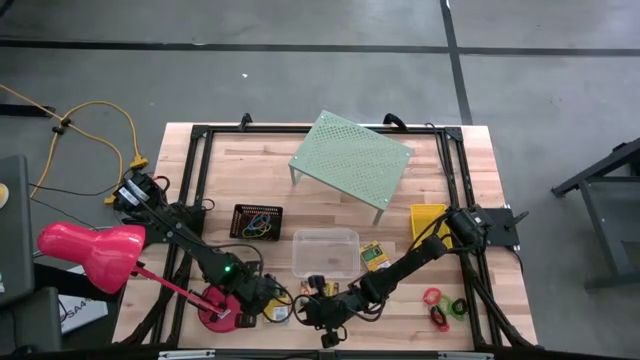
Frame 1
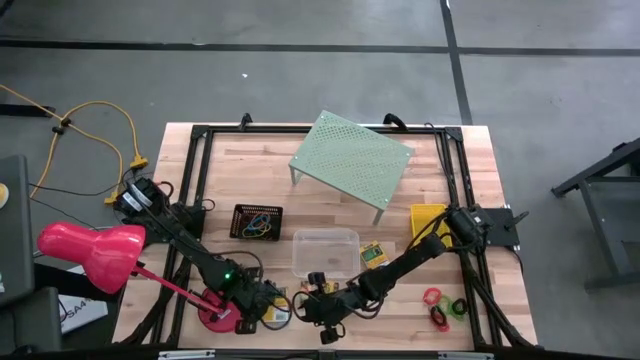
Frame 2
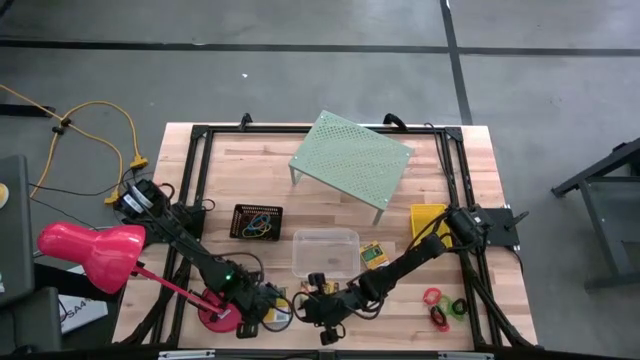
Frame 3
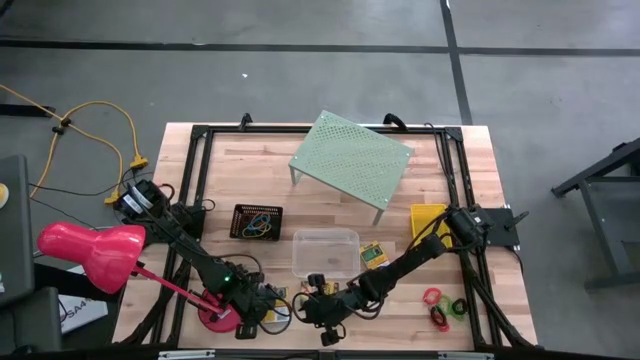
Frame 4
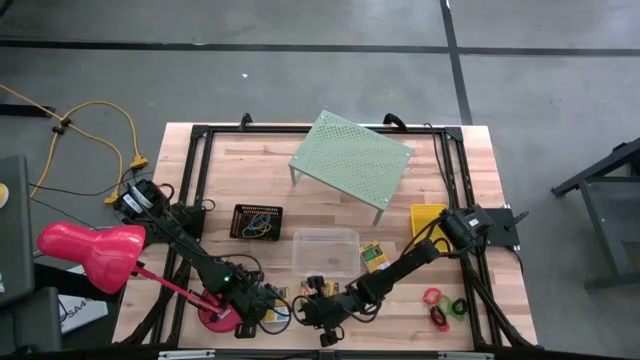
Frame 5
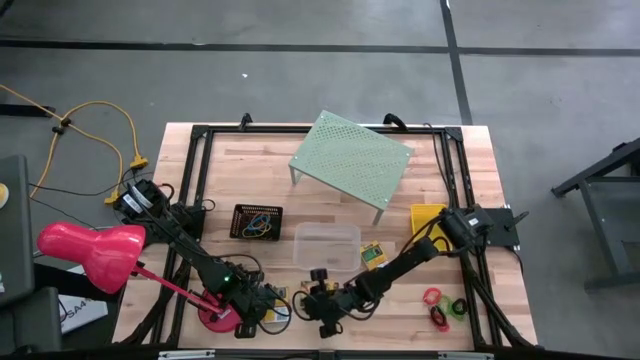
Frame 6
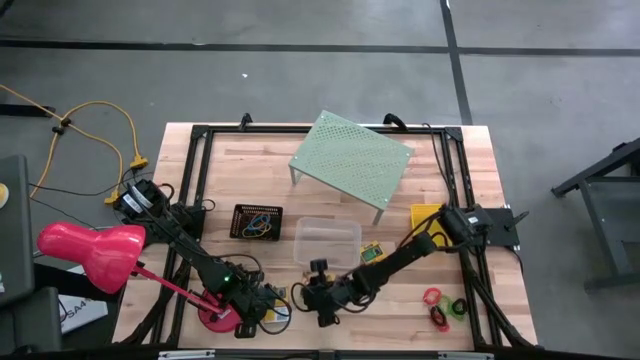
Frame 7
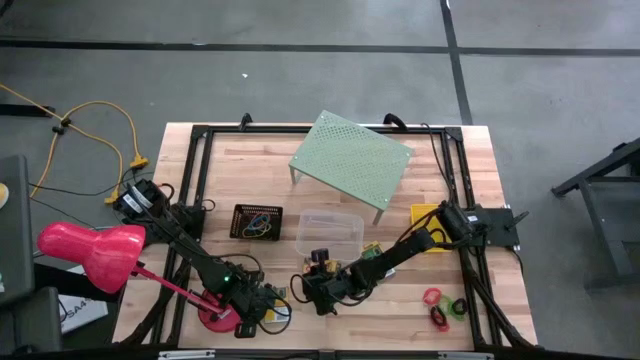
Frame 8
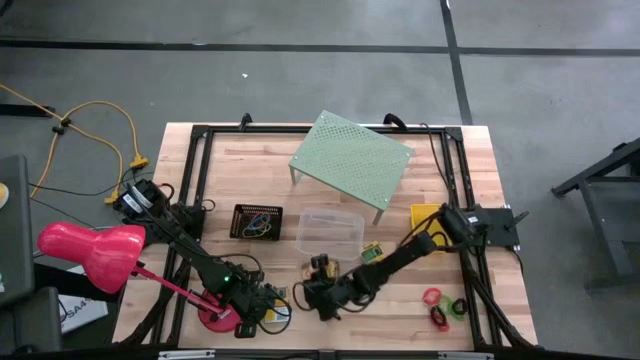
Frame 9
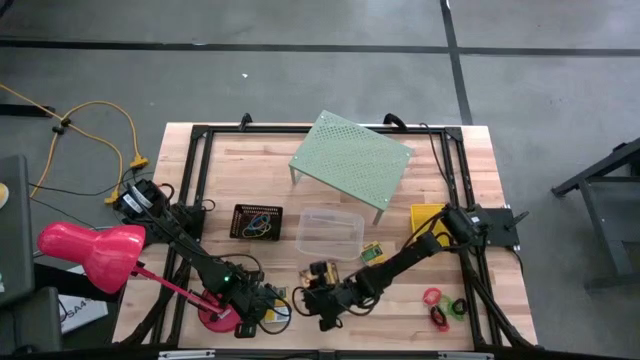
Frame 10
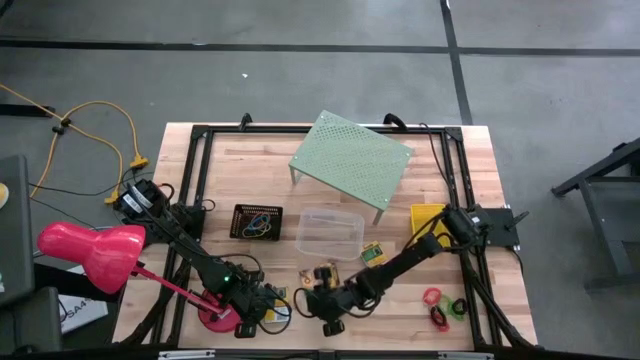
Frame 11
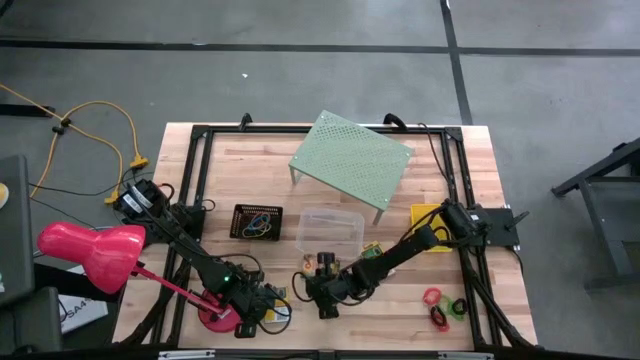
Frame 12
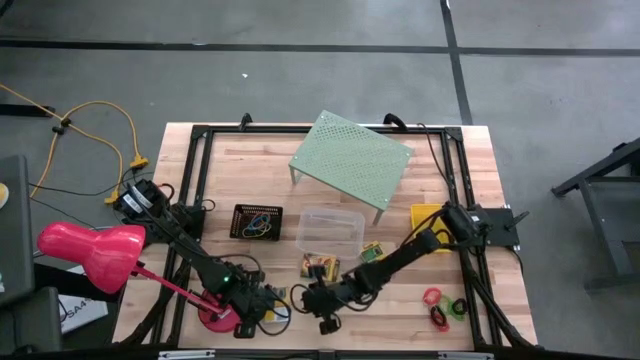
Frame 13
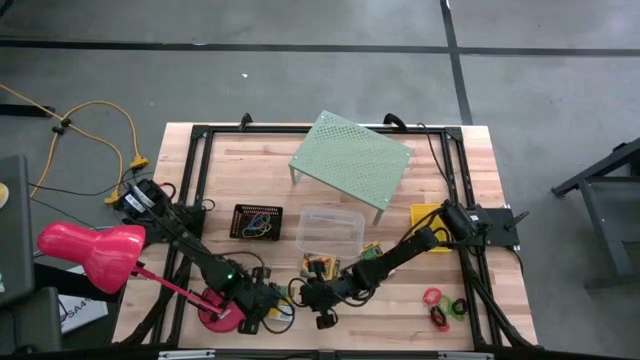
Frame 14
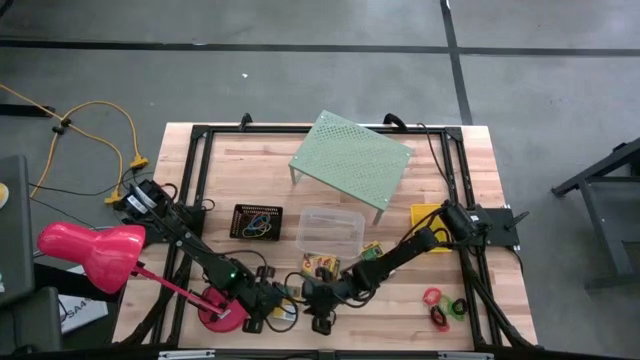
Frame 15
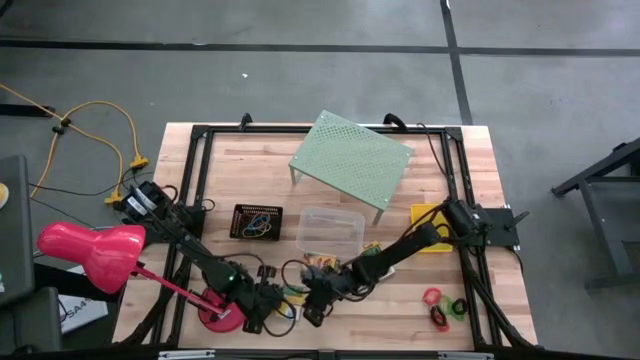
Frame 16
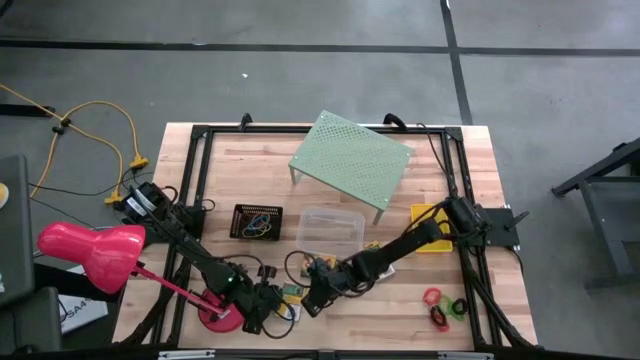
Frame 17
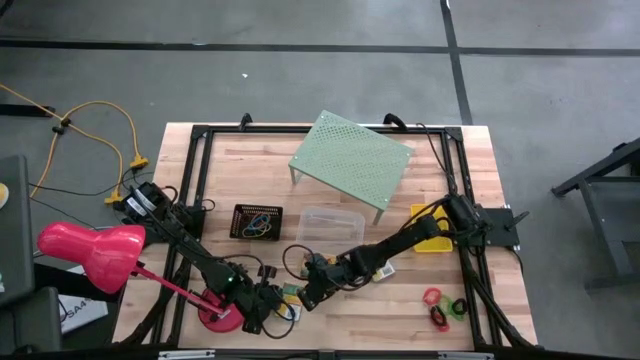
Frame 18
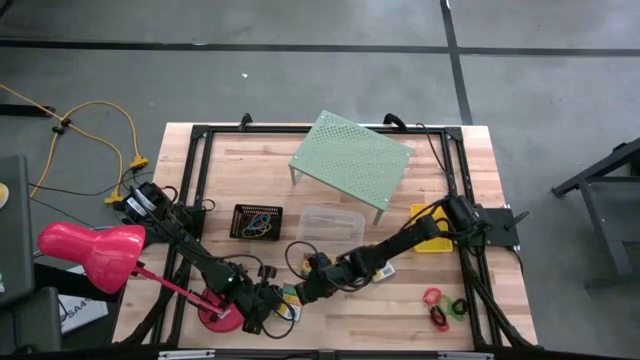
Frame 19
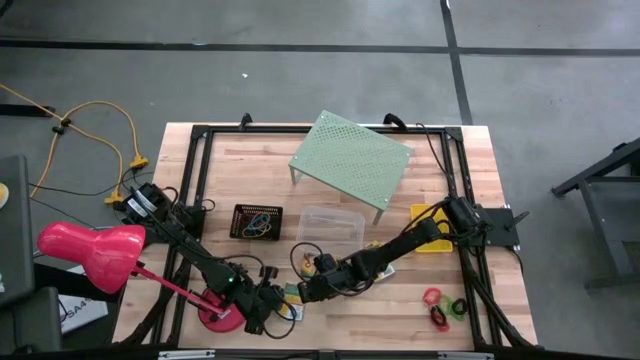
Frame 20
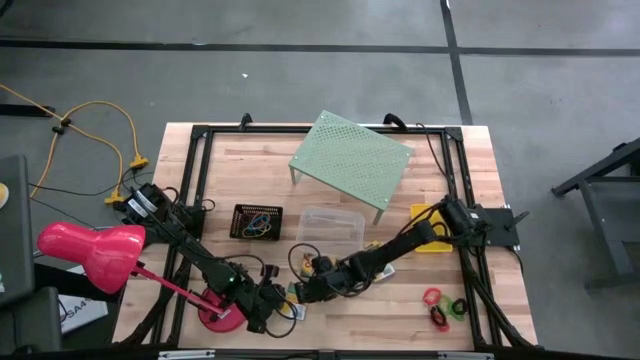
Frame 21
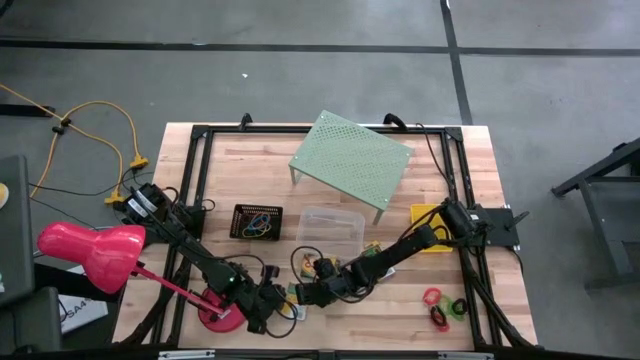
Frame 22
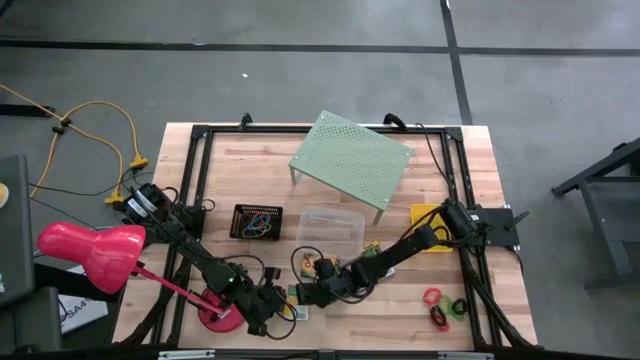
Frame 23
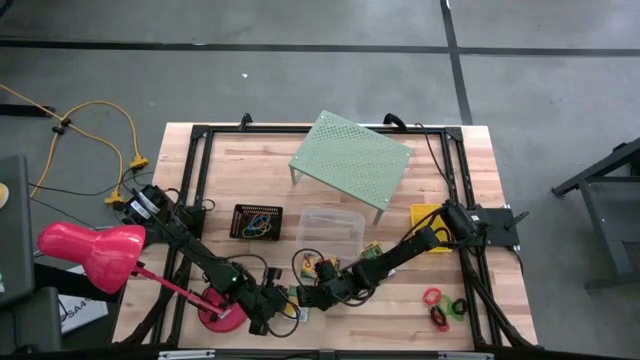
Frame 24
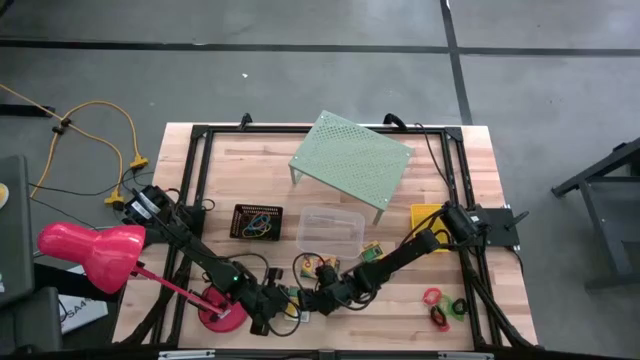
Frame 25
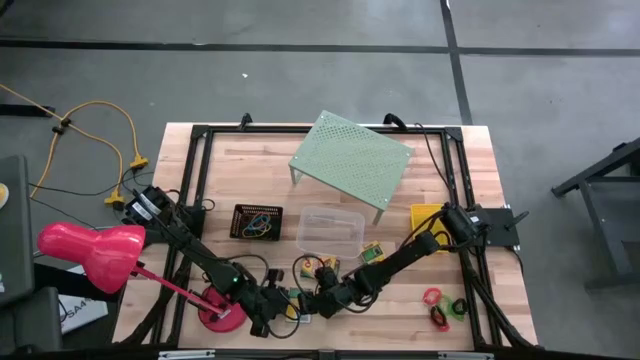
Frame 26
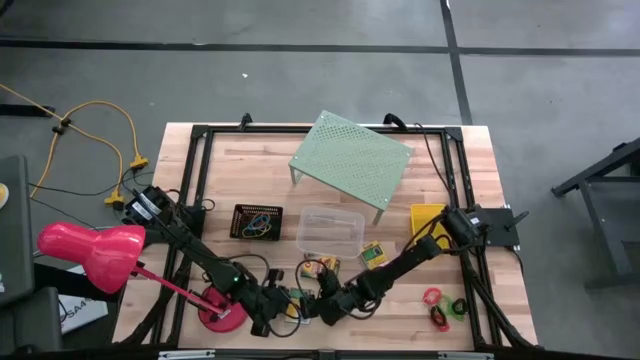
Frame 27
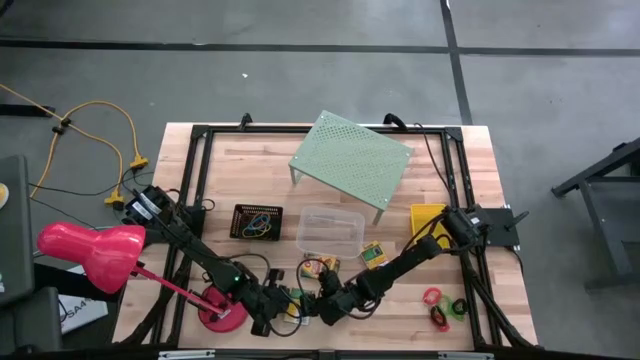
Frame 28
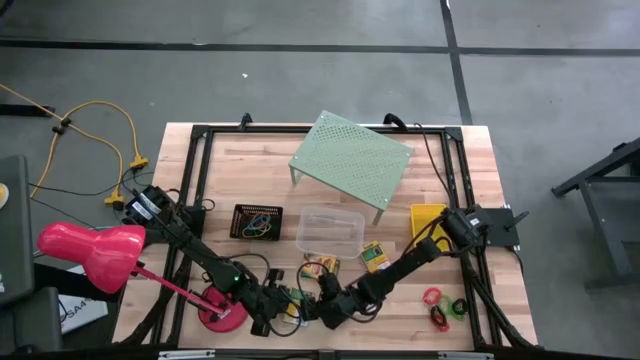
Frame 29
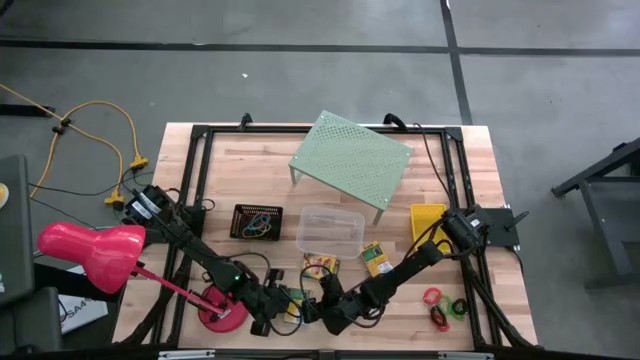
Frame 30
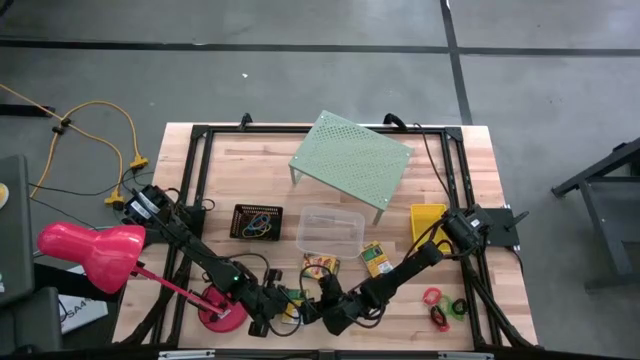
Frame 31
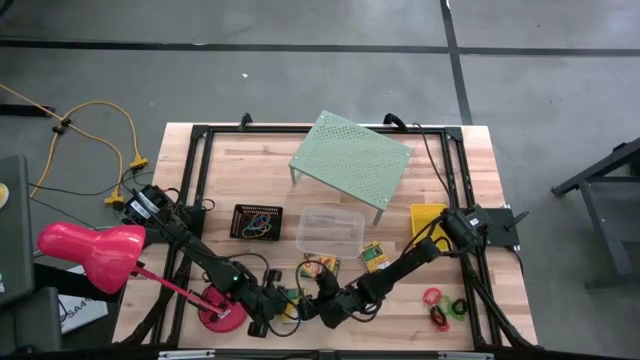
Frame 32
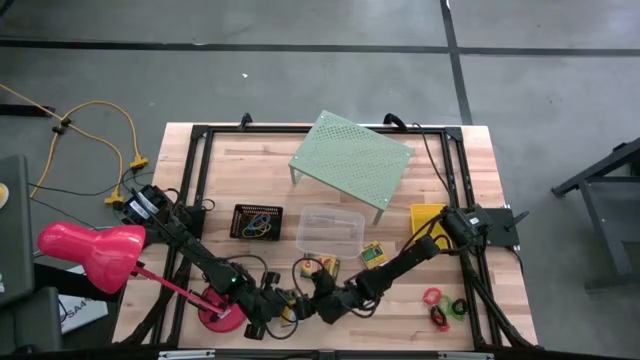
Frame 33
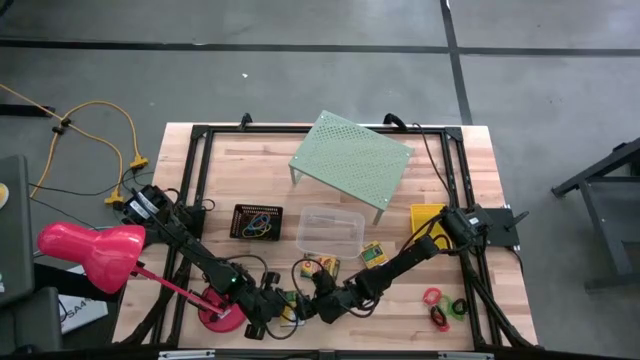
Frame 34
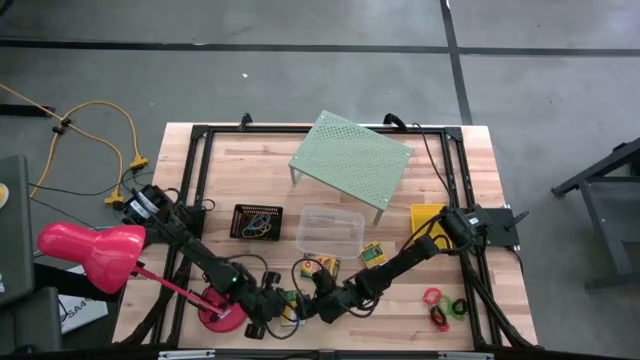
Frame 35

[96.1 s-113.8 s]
Task: Pick & Place Office Desk Supplies
Put the left yellow crayon box into the transparent bin

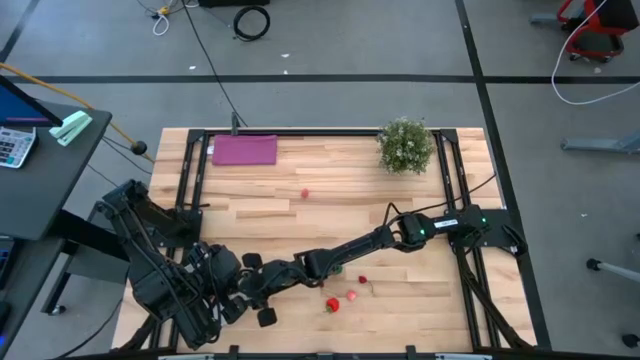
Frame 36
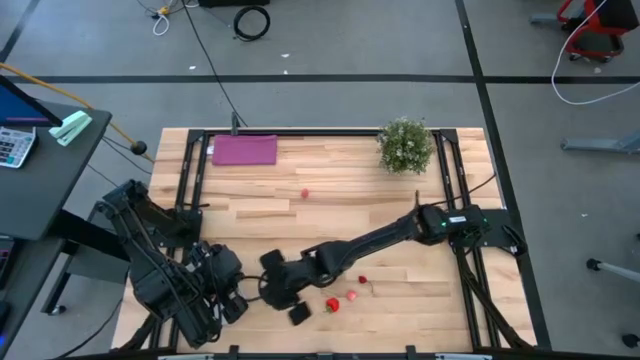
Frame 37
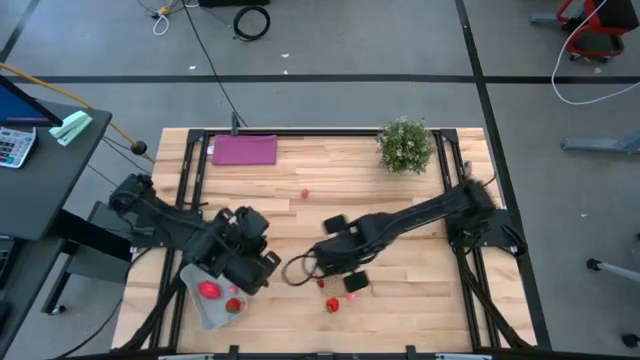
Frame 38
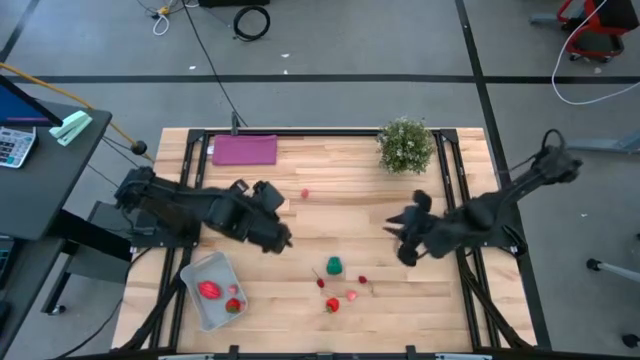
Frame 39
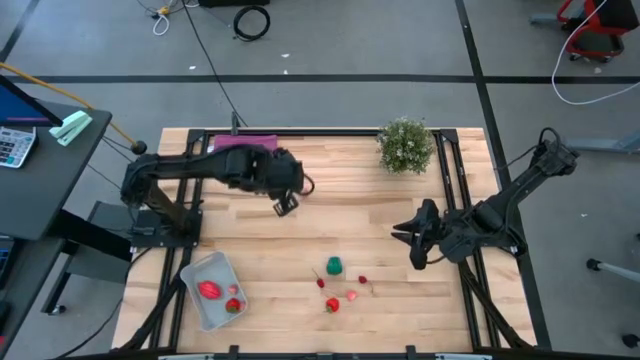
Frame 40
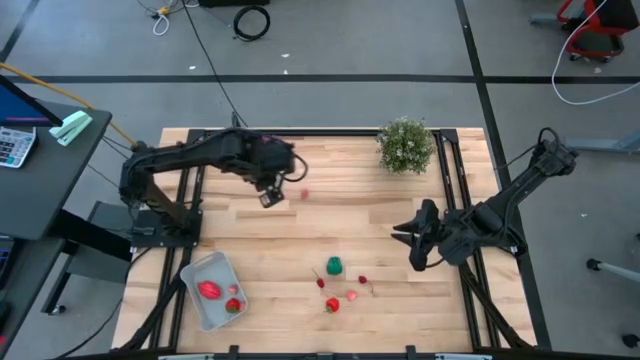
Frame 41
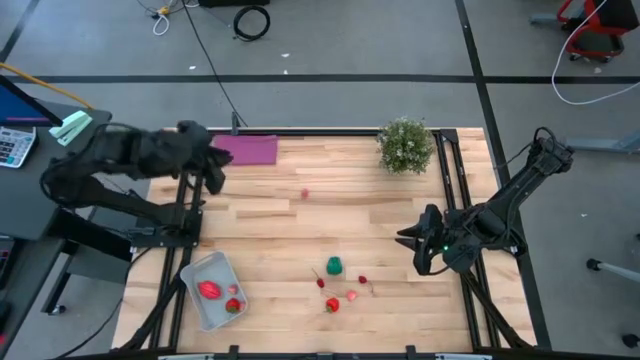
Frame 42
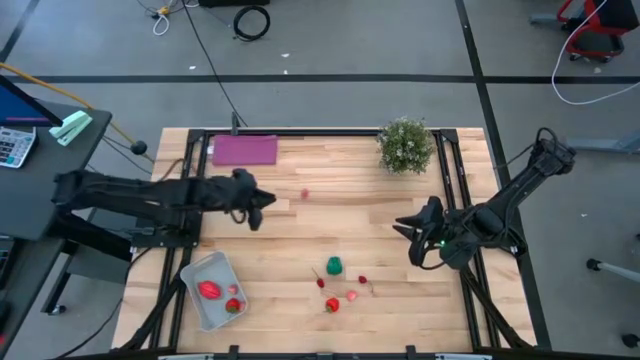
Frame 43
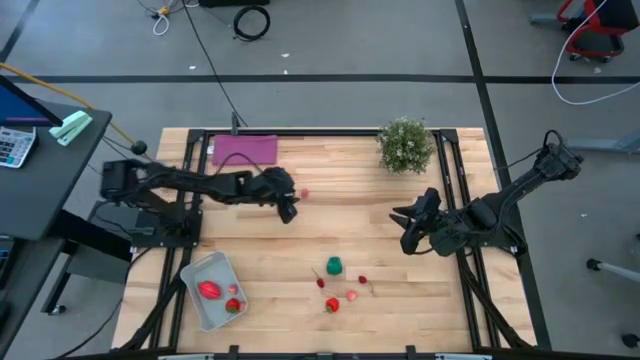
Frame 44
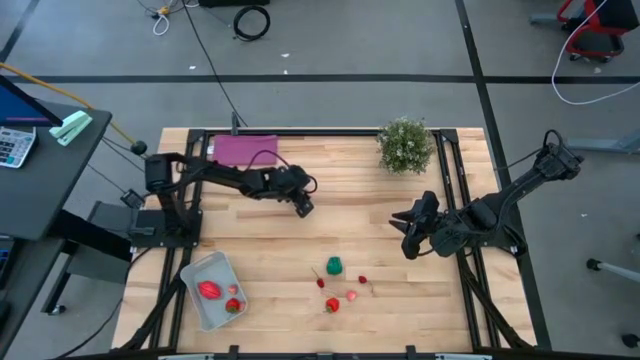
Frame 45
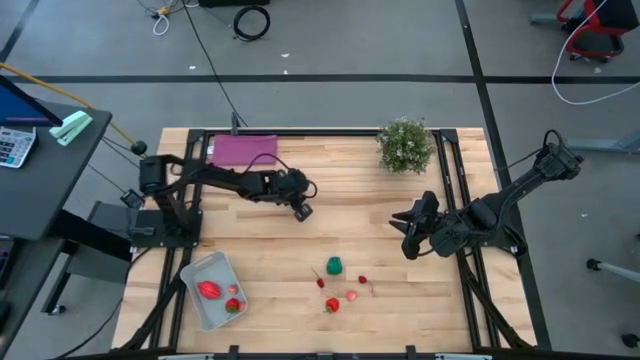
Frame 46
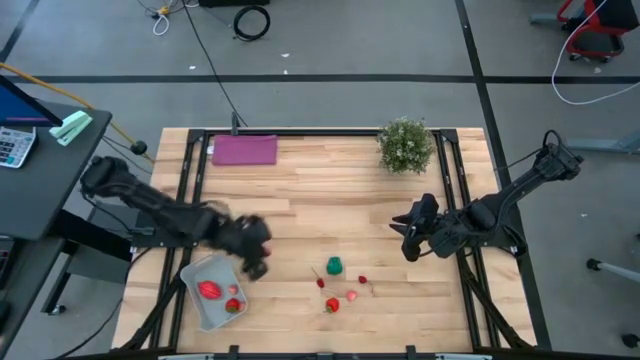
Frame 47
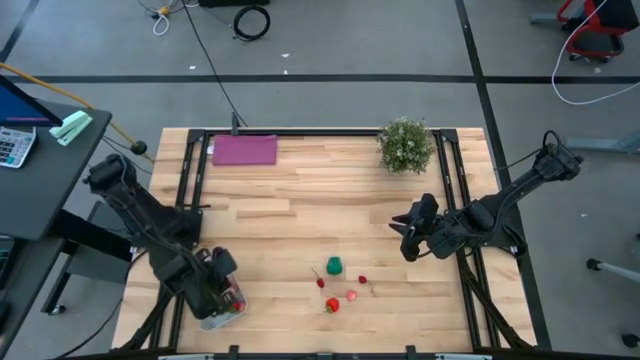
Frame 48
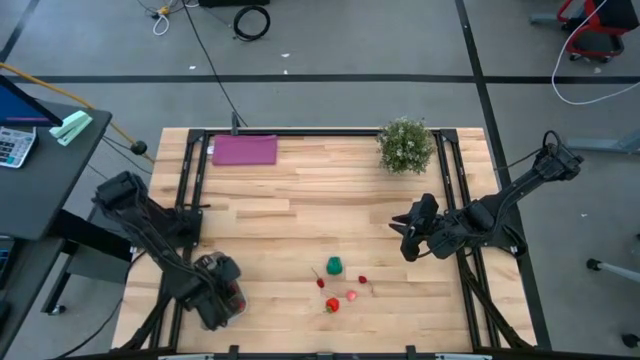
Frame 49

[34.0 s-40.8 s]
Task: Pick and placing Produce into tupperware
Put the pink peach into the gray bin
